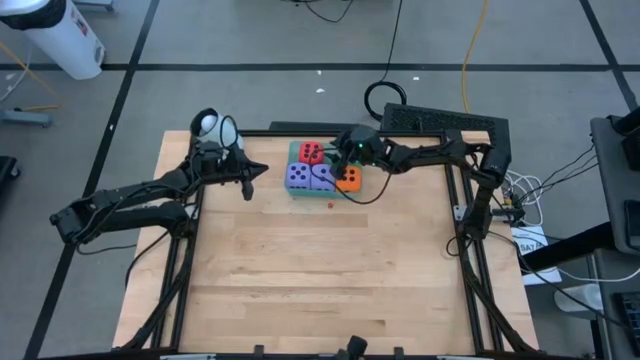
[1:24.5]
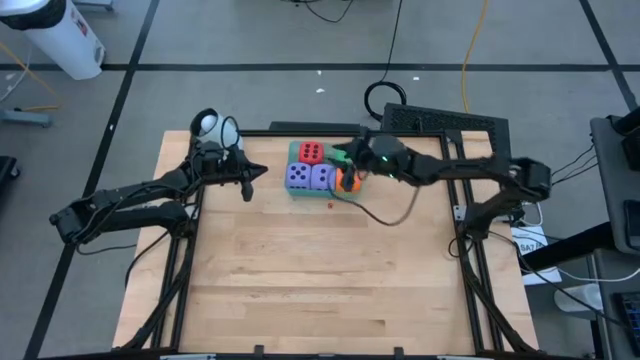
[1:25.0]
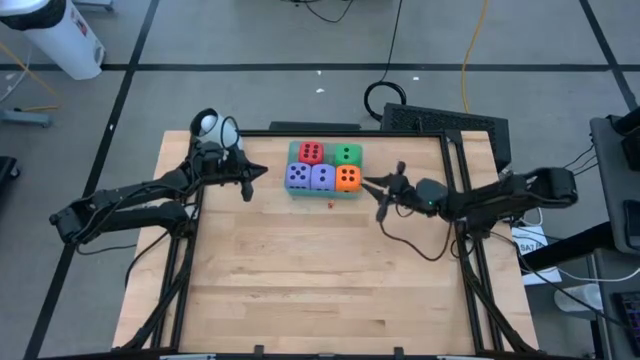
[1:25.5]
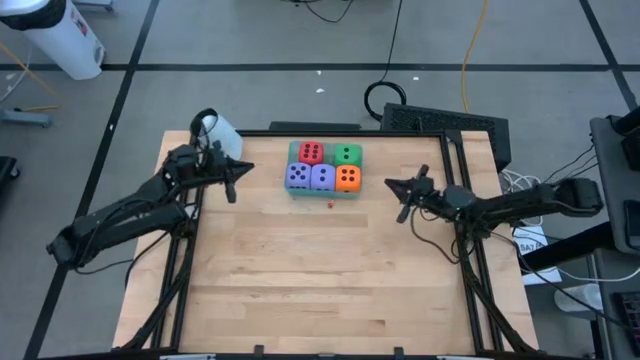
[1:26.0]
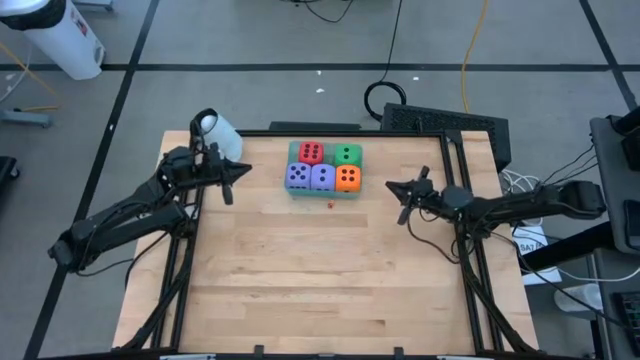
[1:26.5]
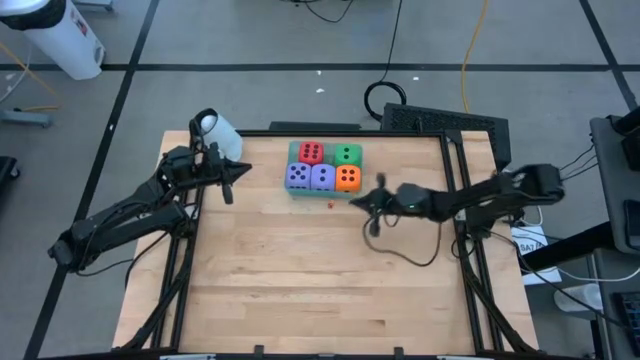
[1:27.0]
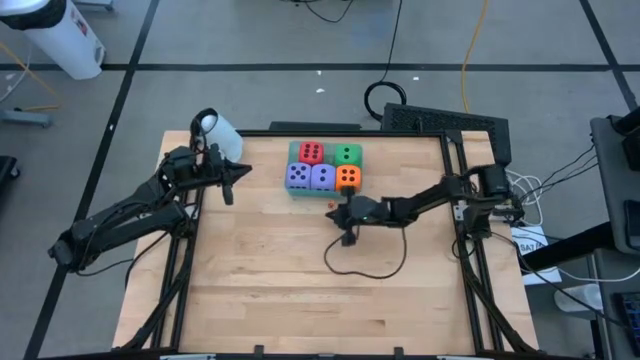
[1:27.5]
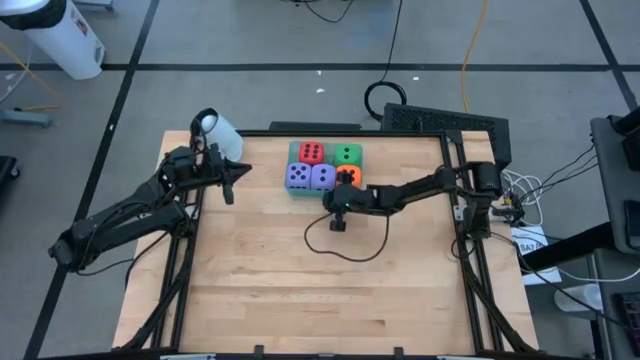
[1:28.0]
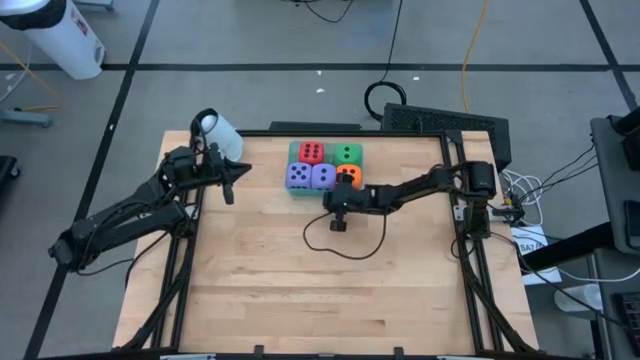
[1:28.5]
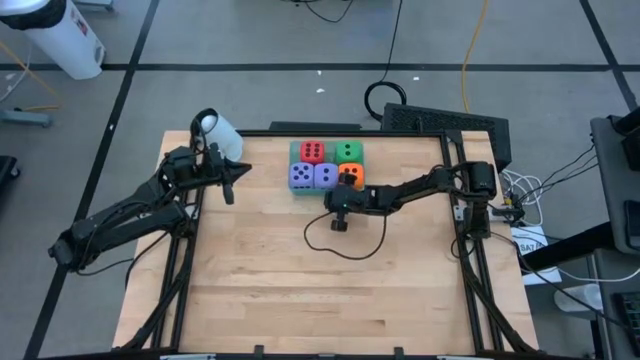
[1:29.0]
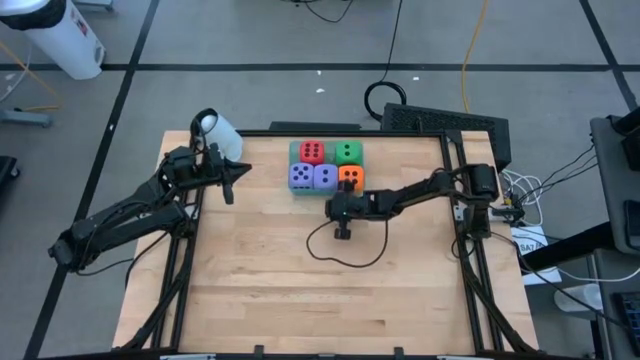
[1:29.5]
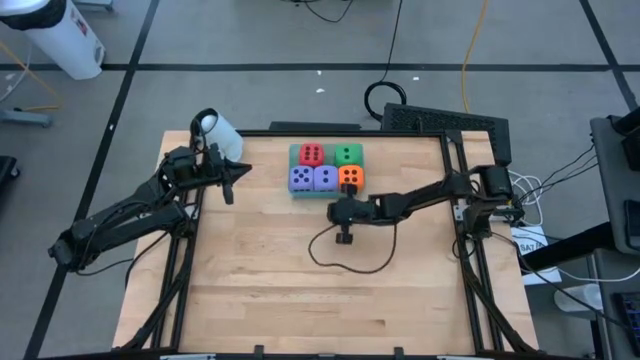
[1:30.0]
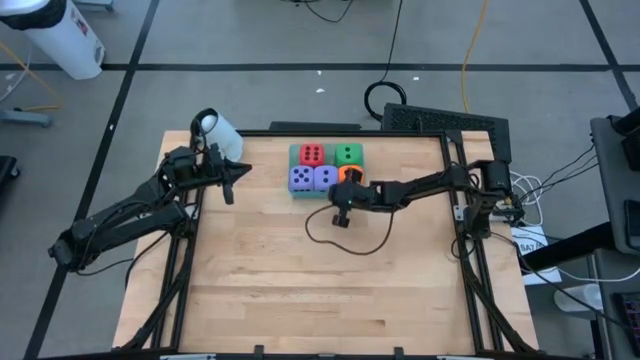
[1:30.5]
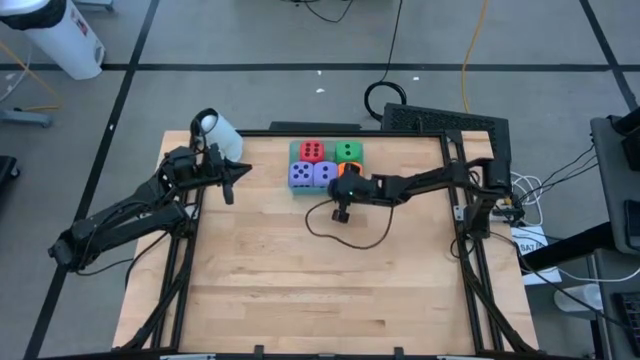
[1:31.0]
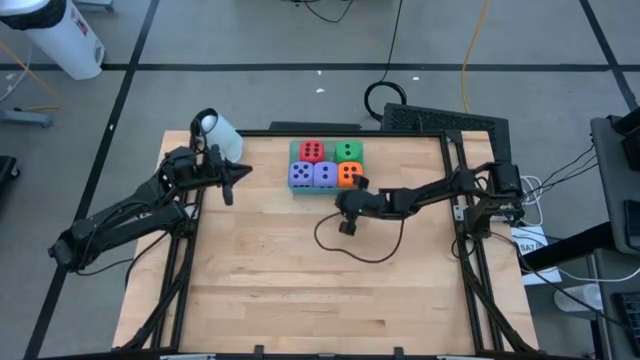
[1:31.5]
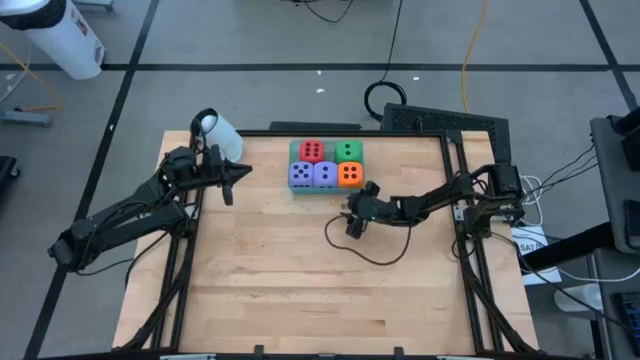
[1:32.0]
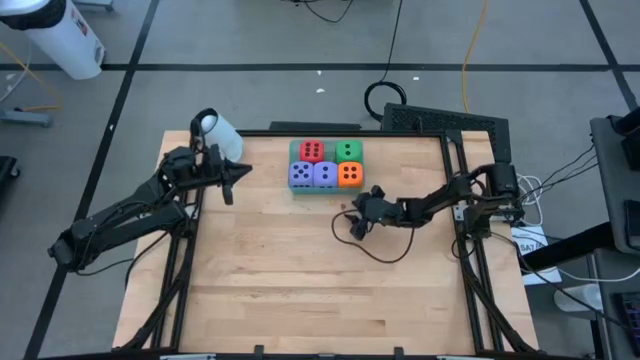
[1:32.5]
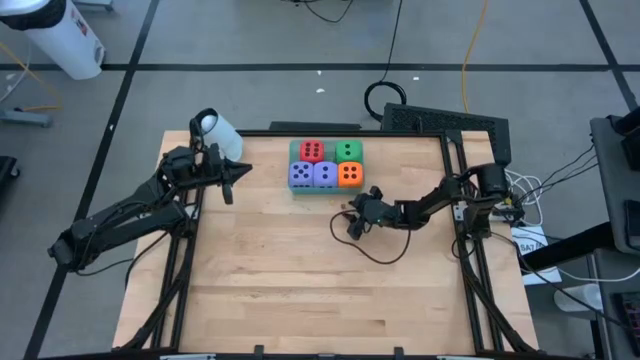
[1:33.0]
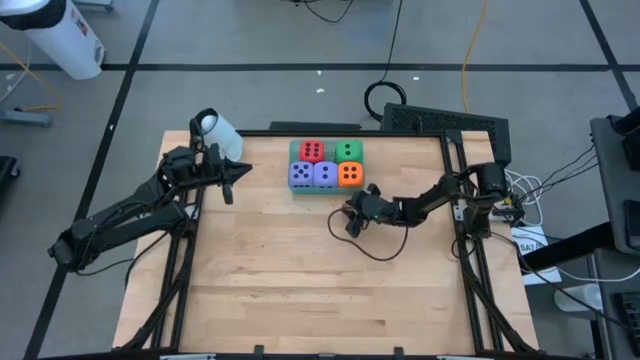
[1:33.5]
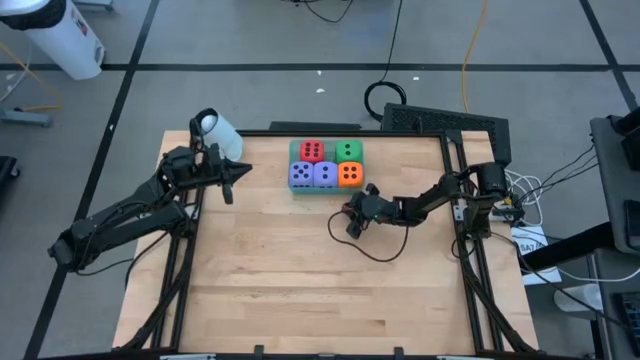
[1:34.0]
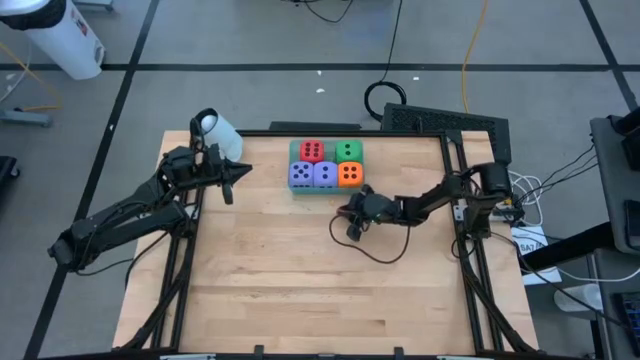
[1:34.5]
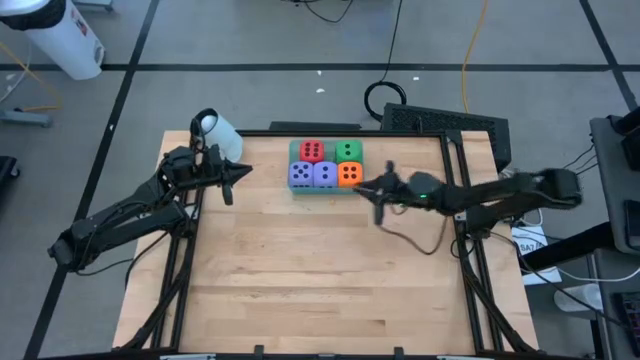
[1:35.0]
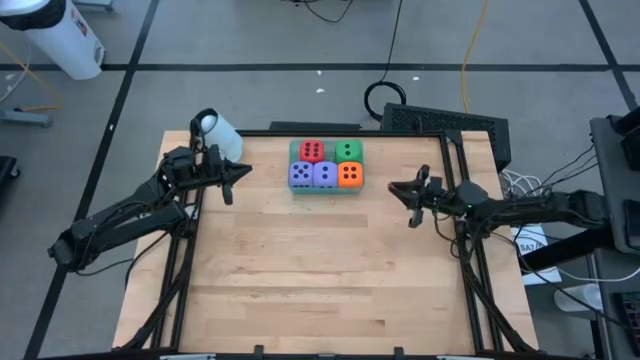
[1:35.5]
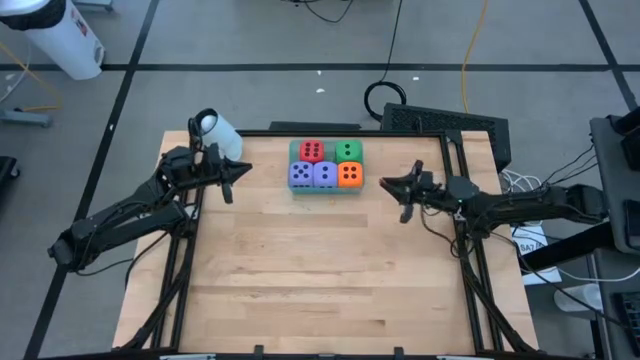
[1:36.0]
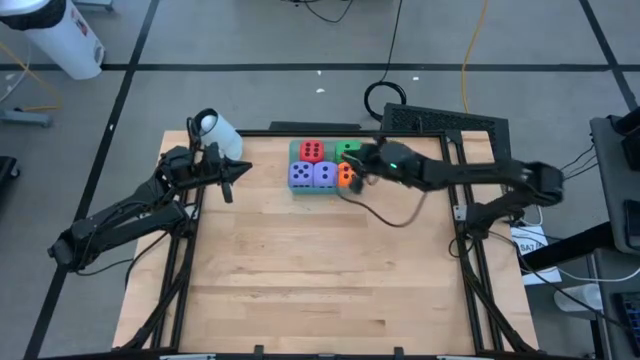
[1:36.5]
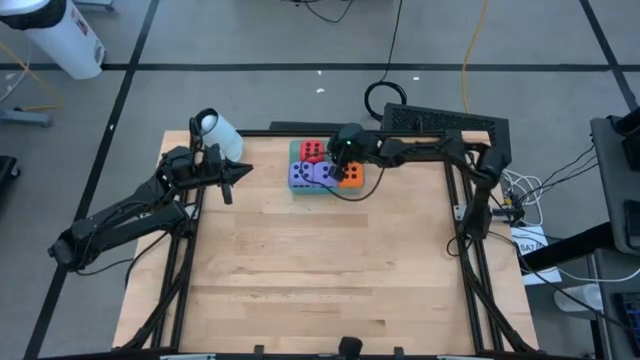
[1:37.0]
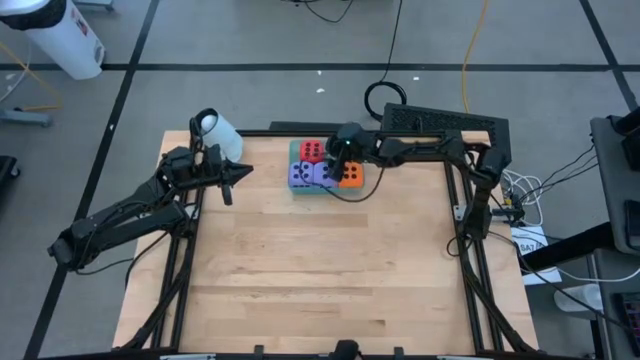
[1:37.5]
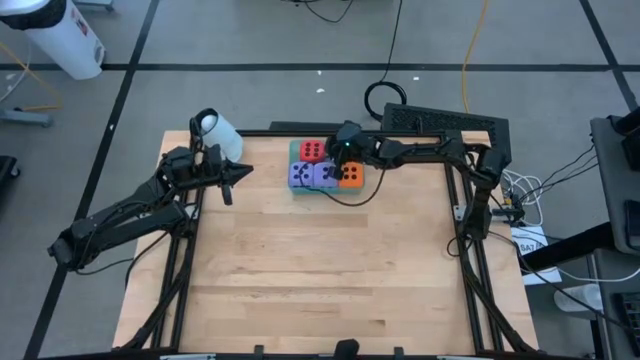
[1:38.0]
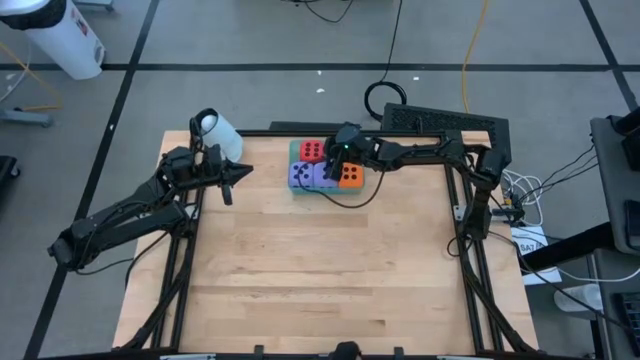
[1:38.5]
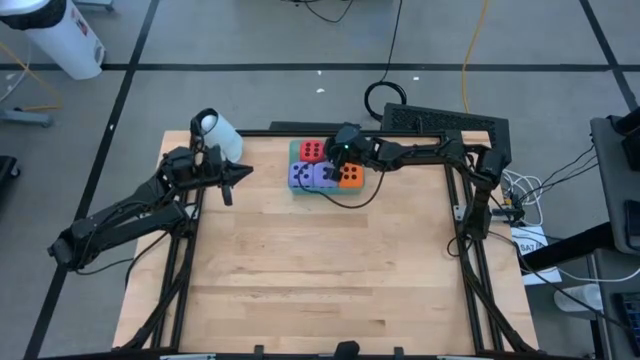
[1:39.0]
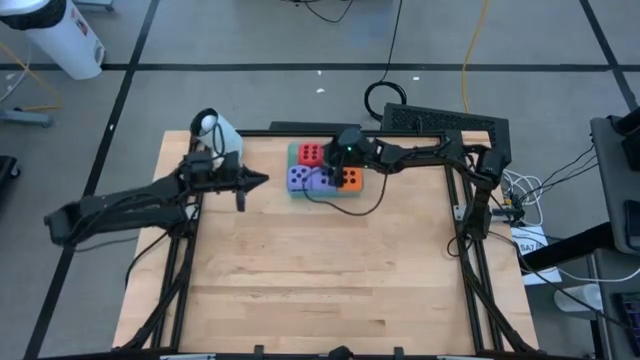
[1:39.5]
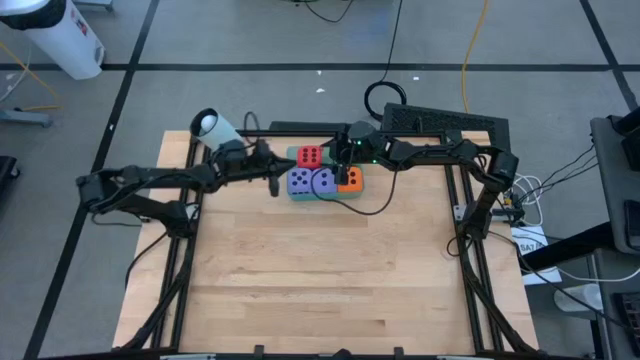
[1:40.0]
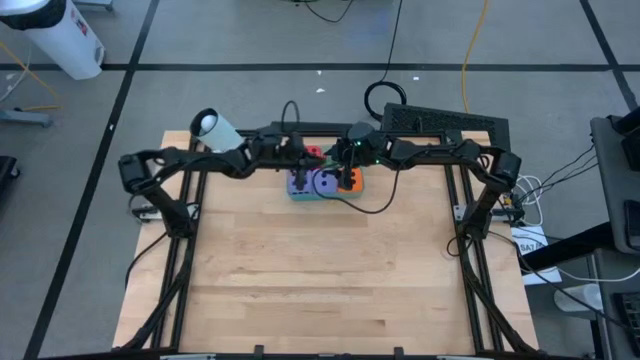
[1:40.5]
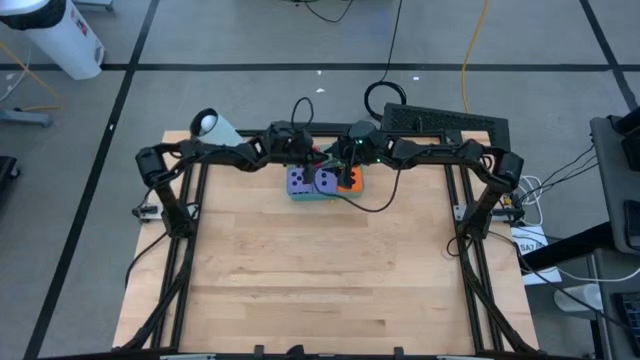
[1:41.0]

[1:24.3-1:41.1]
Task: Pick & Place Dice
Put the small red die into the blue bin

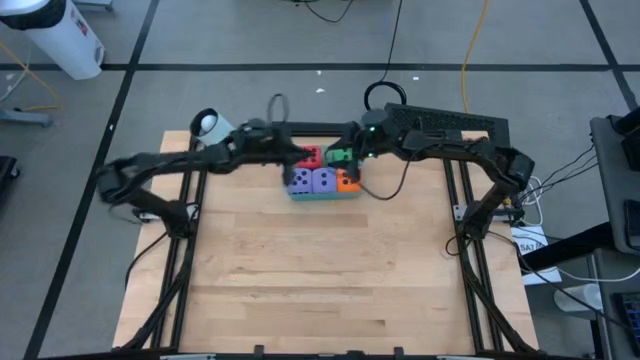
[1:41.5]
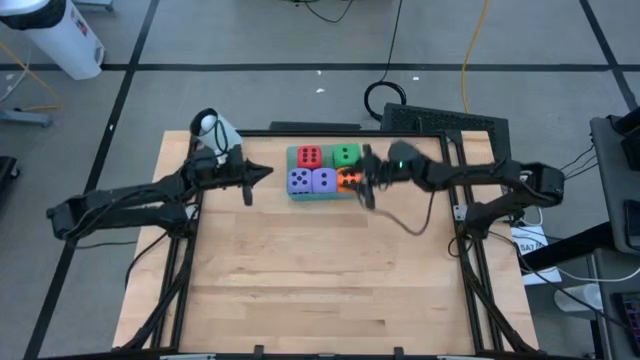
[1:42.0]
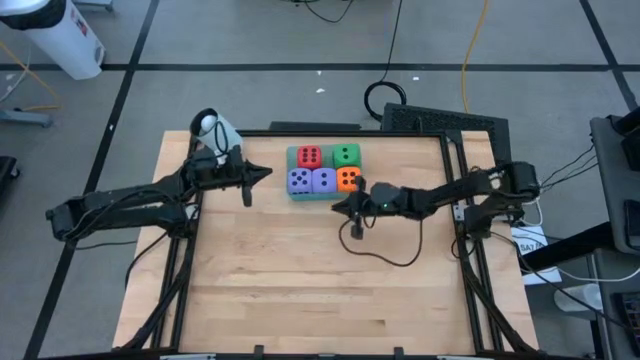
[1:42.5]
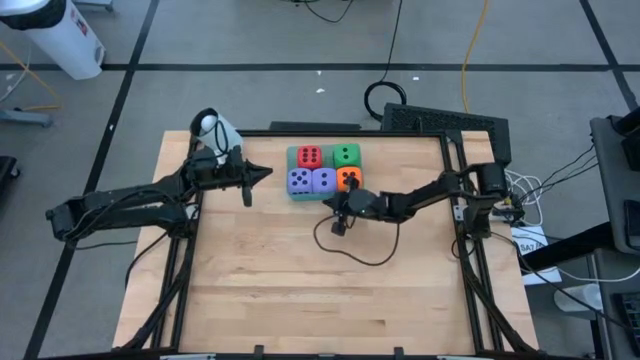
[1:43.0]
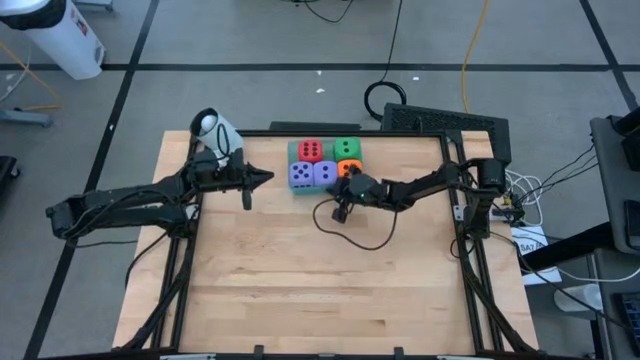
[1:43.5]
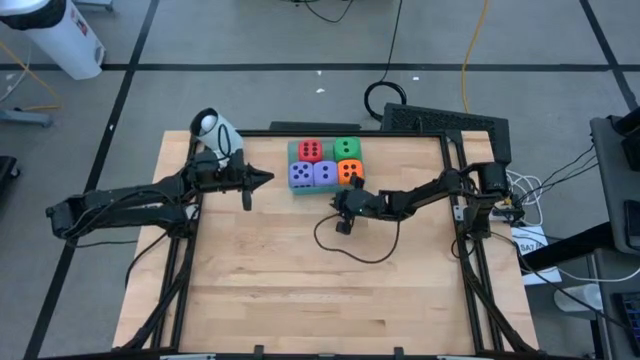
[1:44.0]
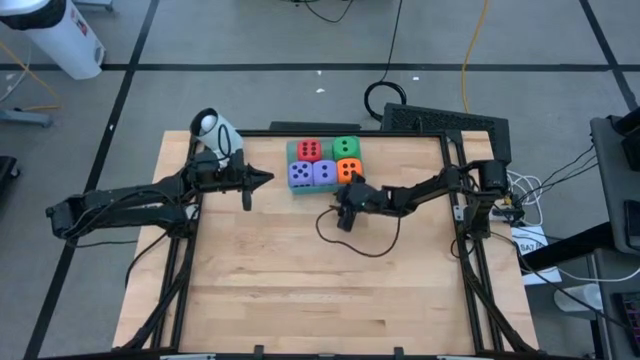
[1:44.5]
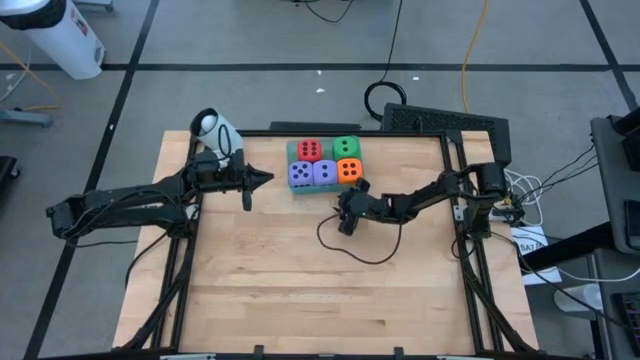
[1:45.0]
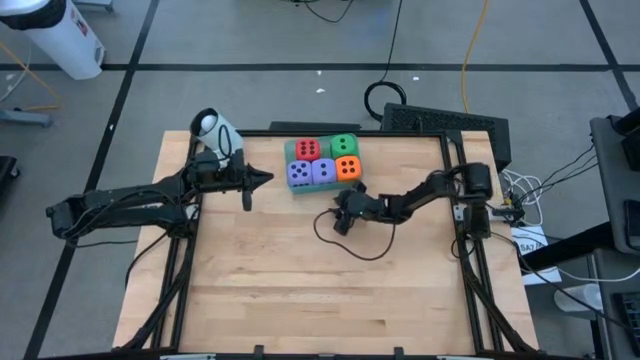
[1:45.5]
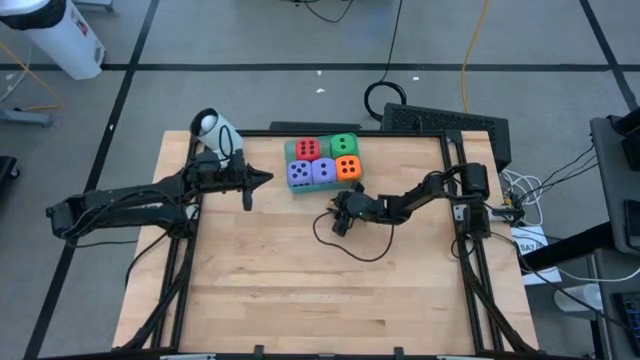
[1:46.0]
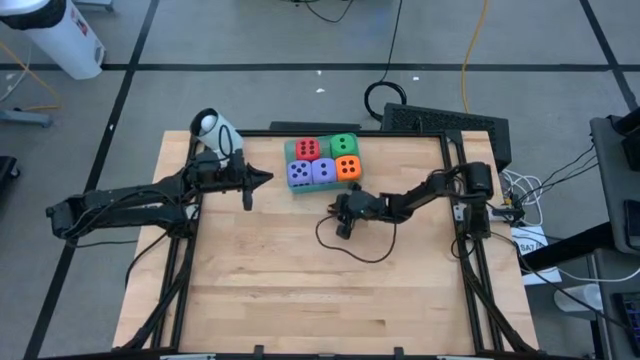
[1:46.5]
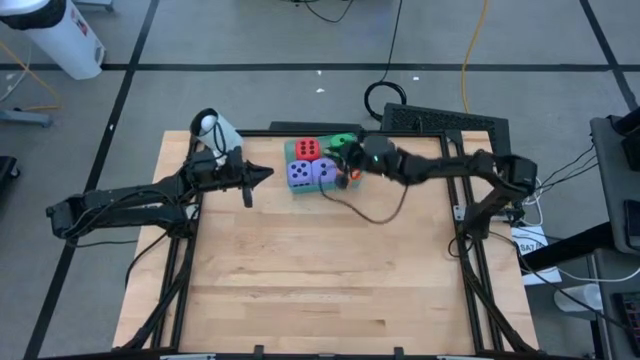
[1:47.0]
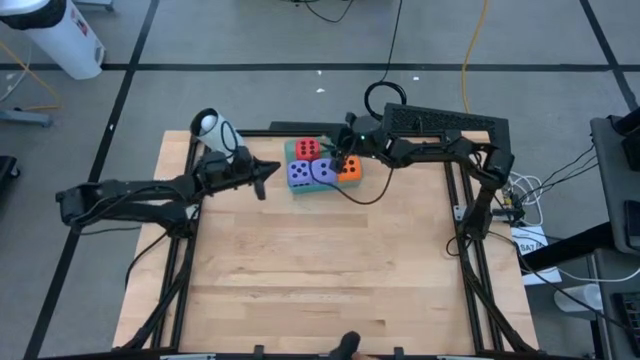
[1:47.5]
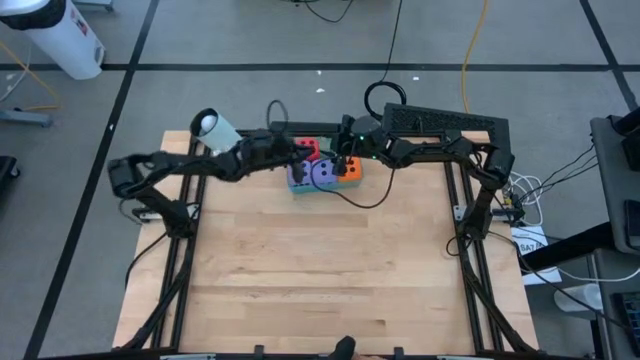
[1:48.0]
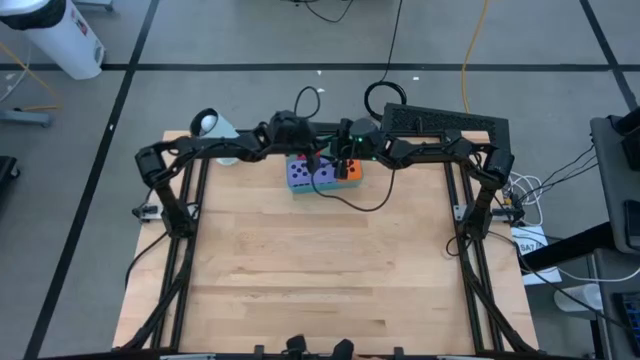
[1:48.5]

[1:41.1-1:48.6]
Put the small yellow die into the blue bin
